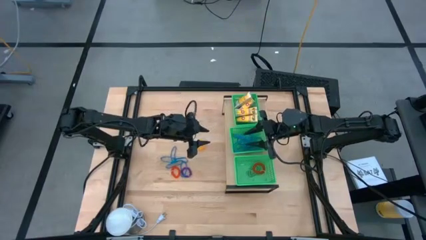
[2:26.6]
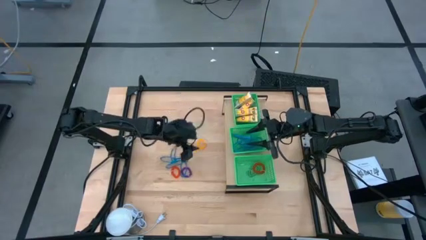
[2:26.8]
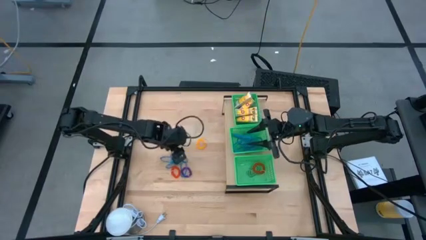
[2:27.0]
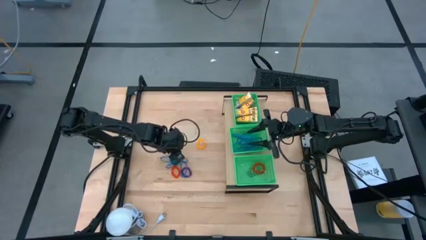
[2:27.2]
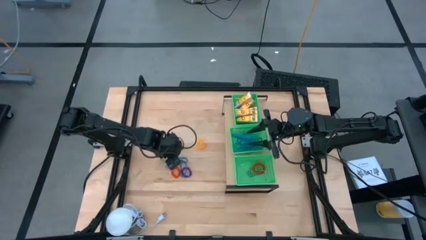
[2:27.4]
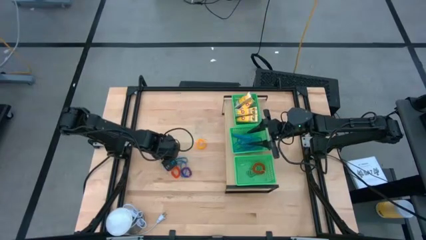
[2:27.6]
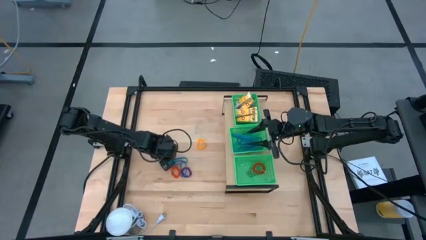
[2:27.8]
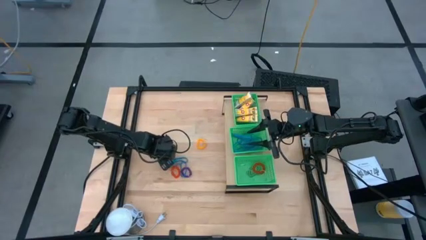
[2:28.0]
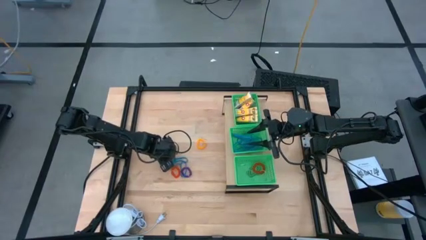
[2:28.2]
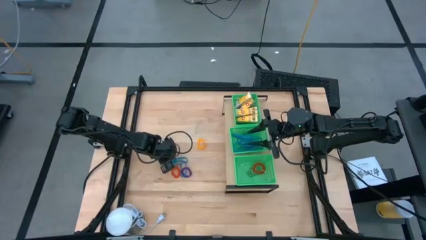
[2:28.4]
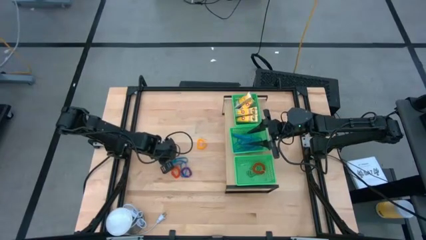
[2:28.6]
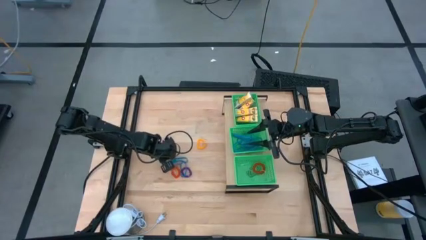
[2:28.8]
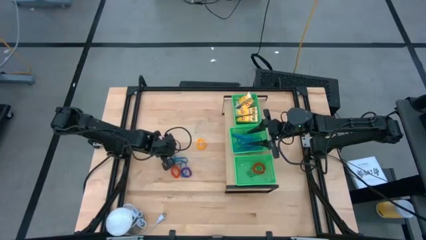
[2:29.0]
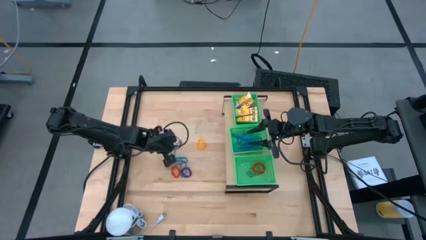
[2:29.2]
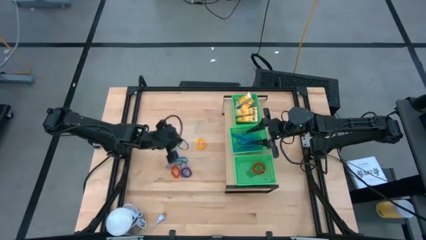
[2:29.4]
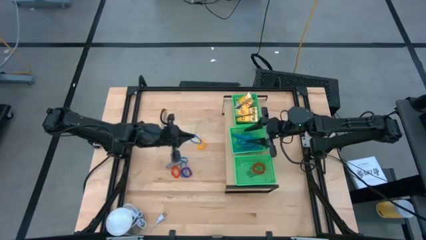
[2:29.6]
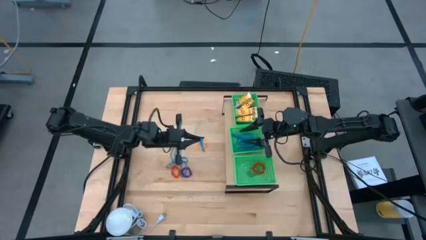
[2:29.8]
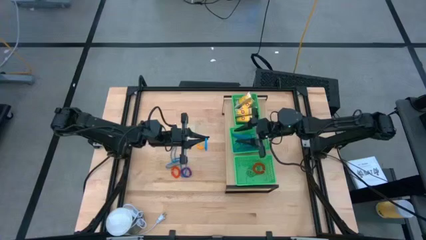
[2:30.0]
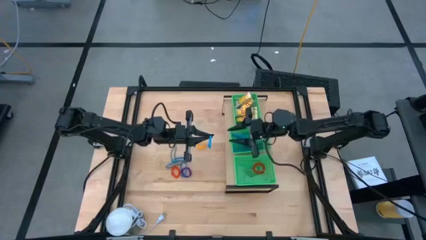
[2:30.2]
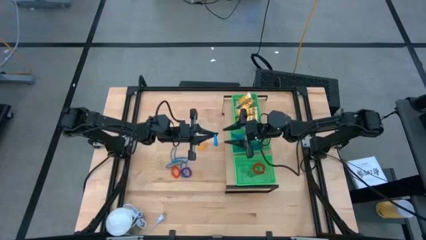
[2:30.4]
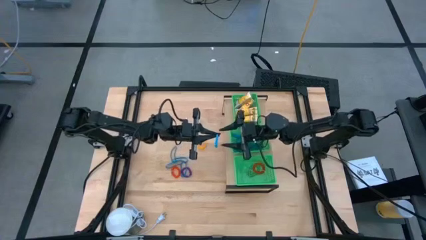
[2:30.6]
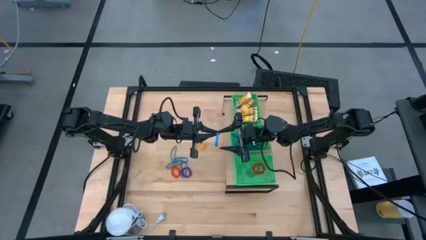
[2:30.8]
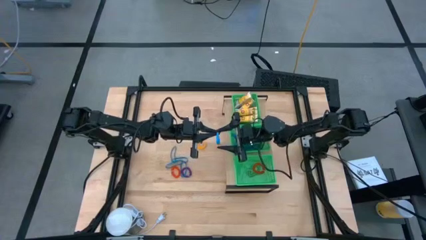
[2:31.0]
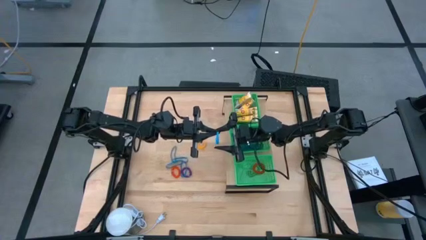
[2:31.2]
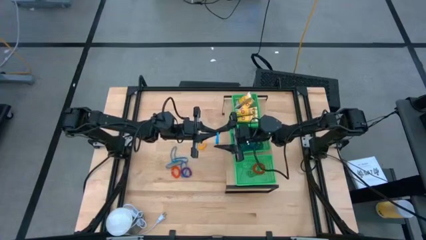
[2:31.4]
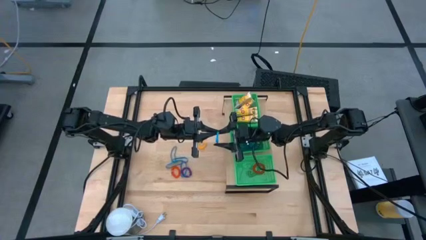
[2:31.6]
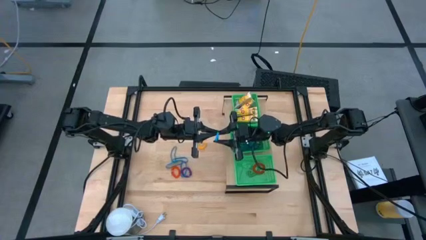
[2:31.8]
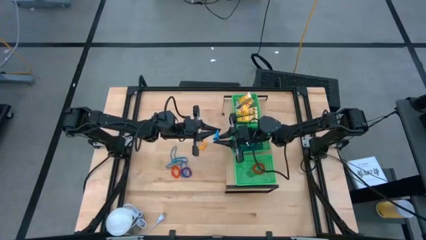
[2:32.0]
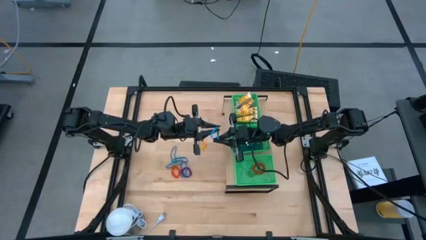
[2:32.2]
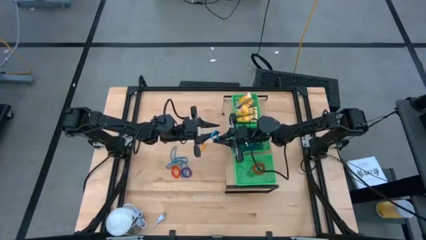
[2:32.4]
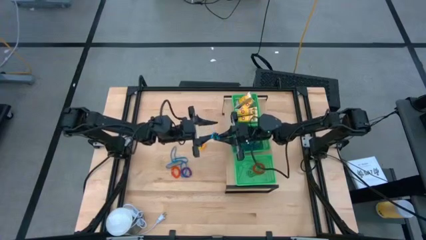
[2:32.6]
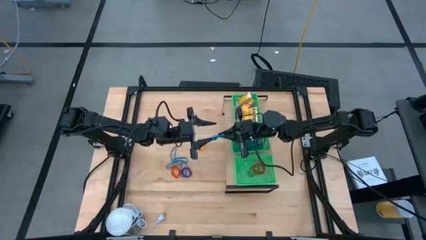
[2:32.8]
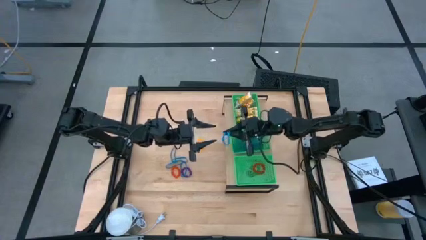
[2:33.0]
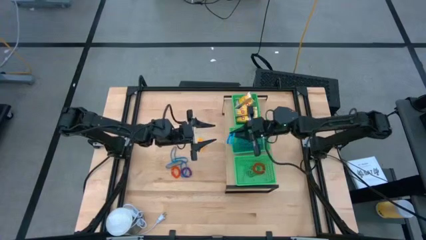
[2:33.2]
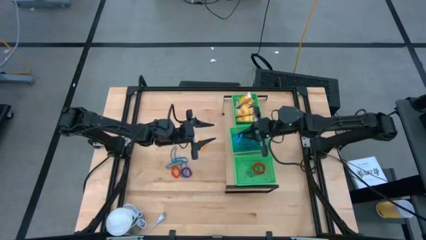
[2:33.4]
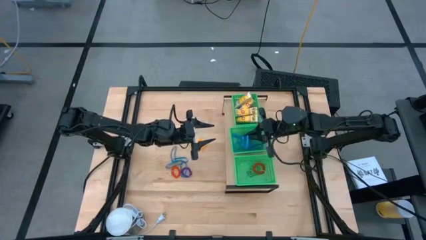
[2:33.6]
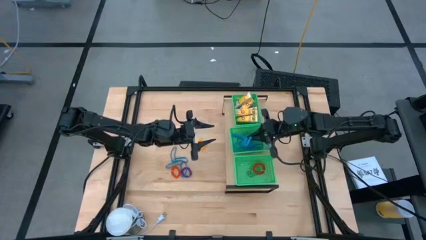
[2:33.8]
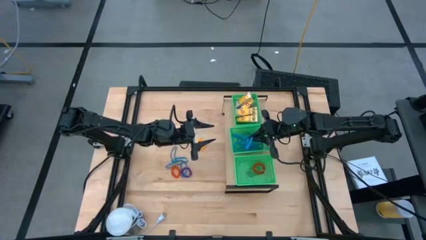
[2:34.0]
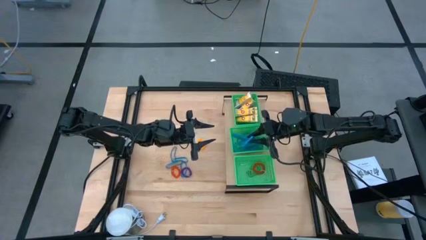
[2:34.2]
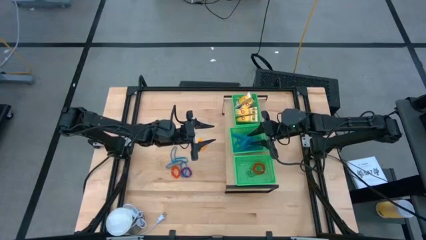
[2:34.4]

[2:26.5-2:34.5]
Task: Pick & Place Office Desk Supplies
Put the blue rubber band into the middle green bin

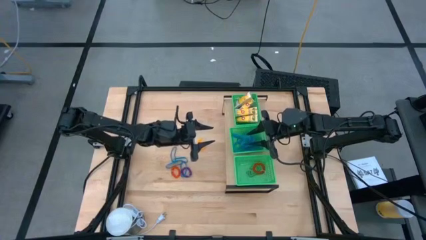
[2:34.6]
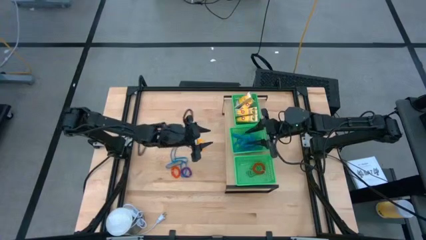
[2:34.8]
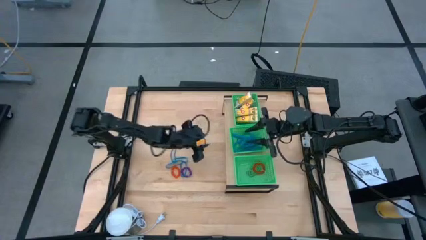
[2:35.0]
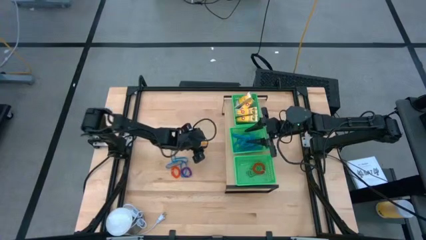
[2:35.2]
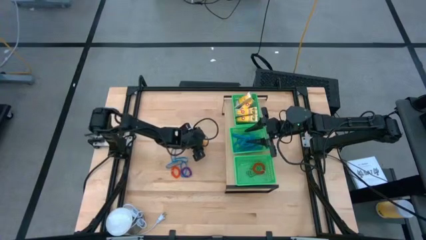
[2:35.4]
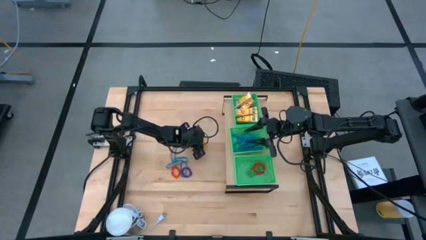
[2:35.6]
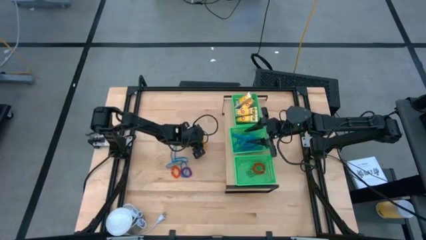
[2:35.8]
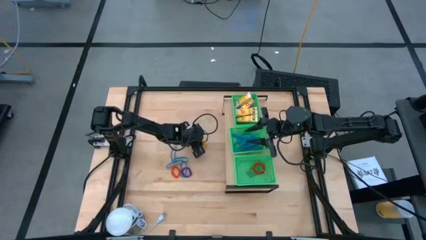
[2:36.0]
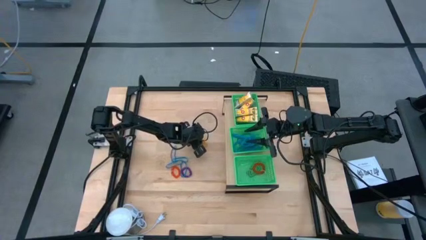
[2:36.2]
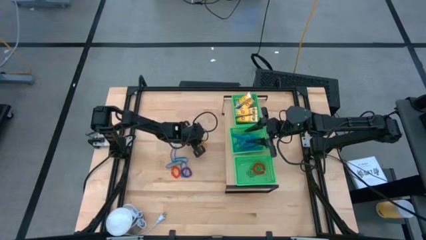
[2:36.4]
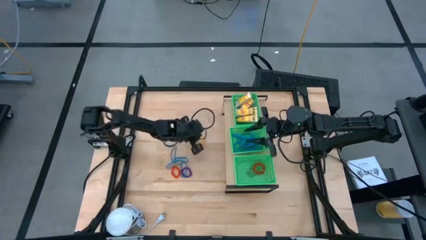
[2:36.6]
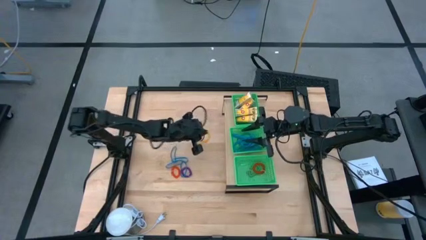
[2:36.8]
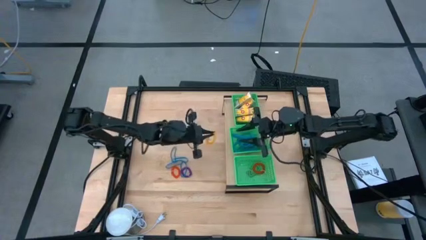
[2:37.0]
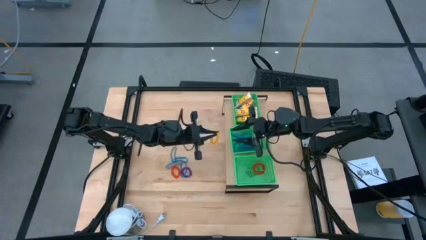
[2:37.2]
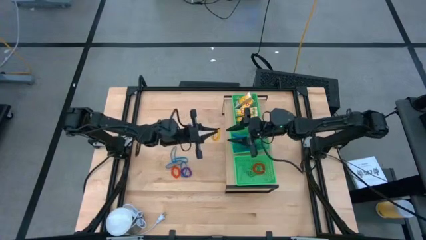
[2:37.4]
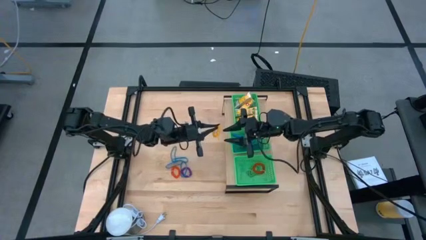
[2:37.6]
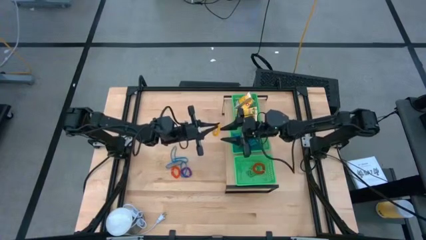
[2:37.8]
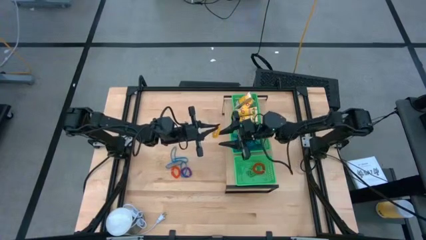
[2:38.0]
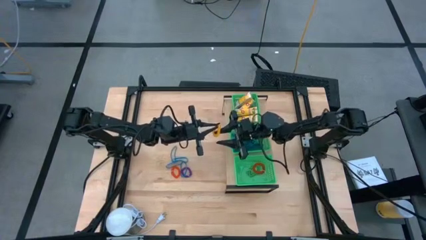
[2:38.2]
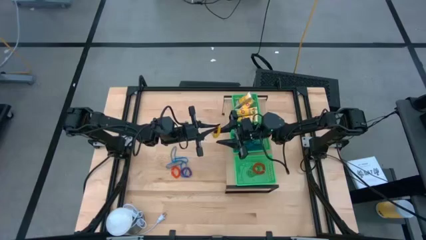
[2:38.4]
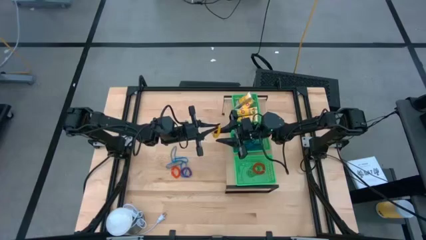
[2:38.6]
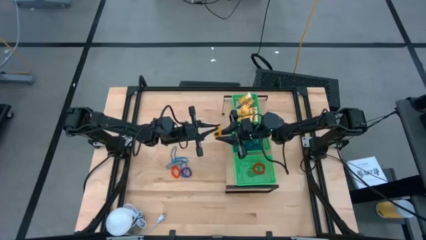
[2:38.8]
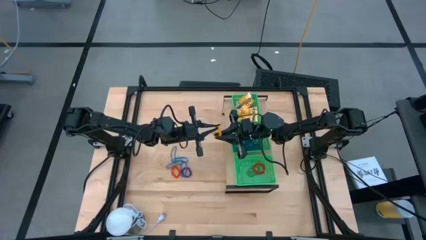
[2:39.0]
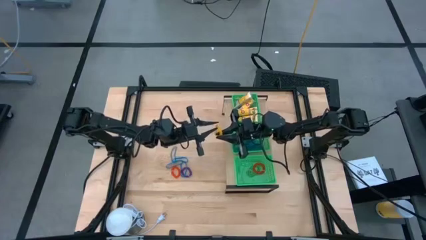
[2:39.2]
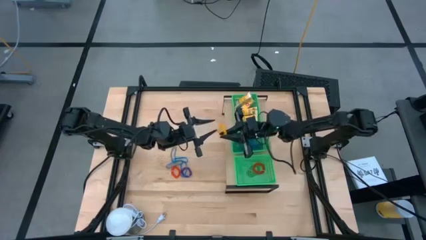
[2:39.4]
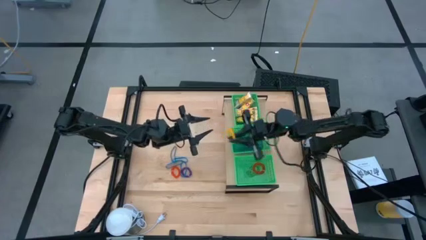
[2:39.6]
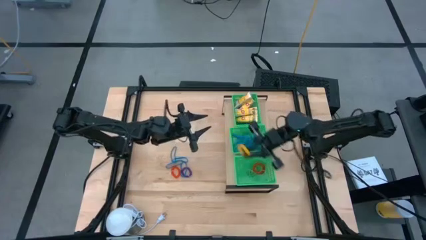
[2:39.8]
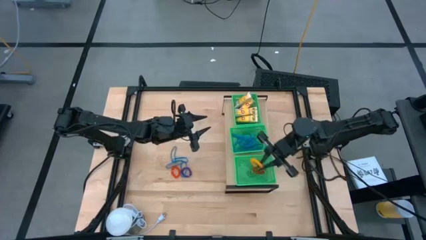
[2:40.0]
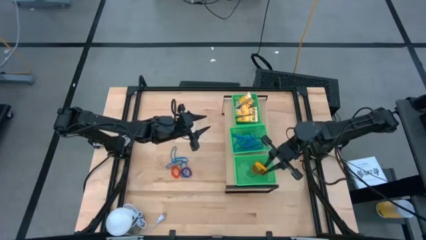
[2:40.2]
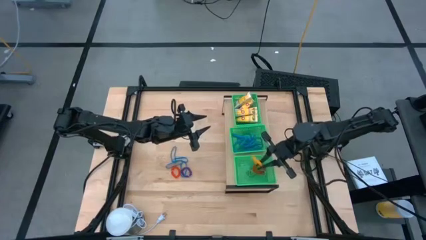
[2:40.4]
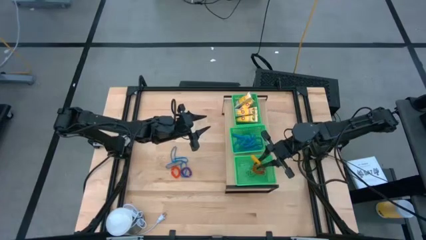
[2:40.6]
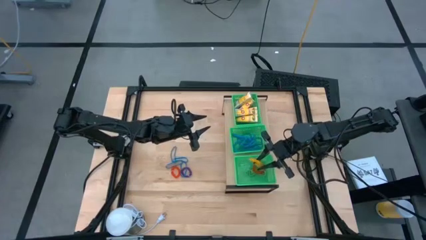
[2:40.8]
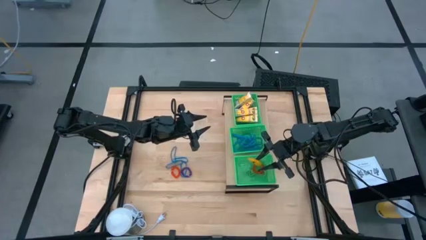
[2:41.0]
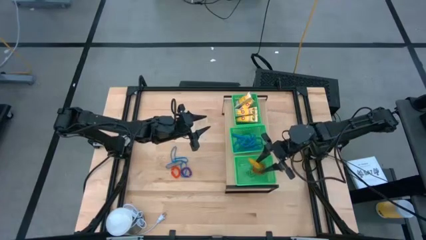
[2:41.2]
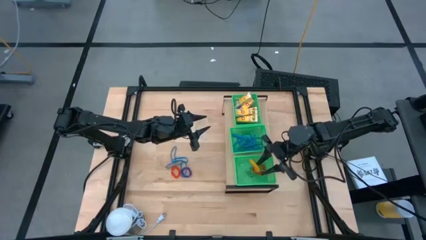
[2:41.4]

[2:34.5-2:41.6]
Put the yellow spring keychain into the bottom green bin

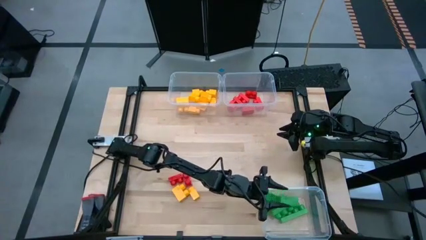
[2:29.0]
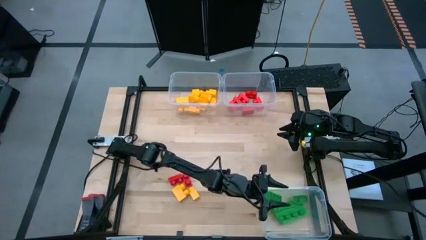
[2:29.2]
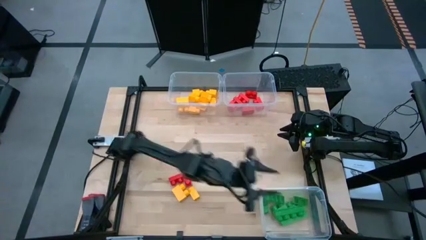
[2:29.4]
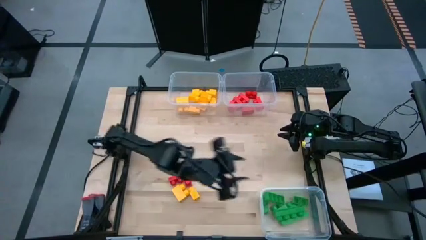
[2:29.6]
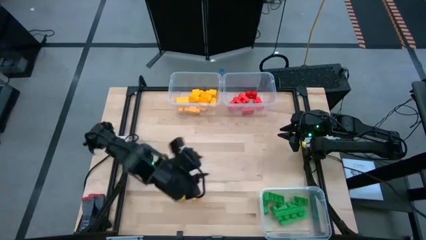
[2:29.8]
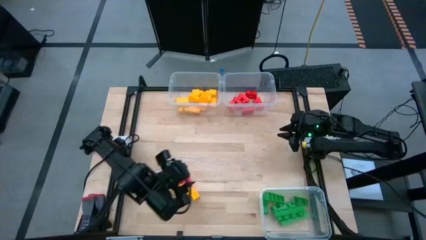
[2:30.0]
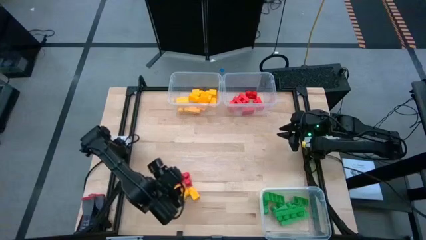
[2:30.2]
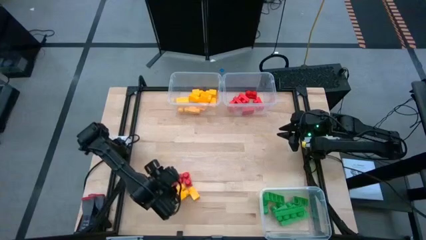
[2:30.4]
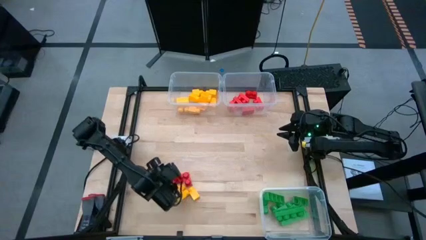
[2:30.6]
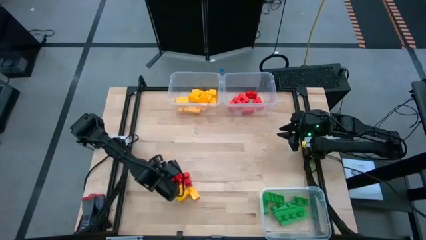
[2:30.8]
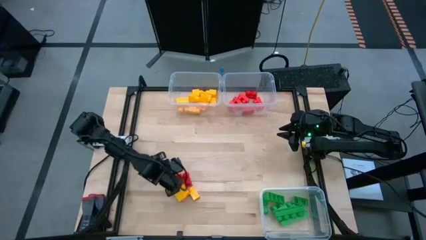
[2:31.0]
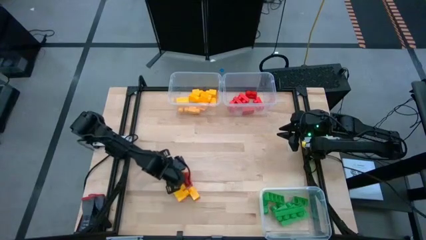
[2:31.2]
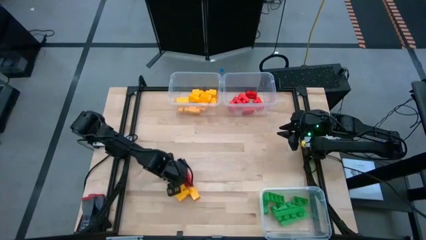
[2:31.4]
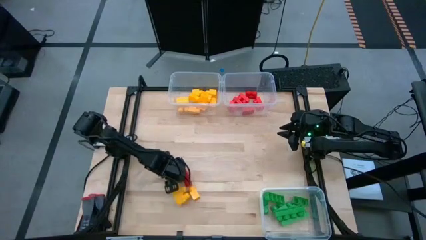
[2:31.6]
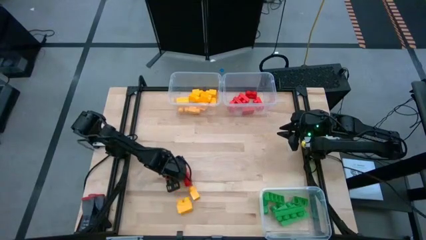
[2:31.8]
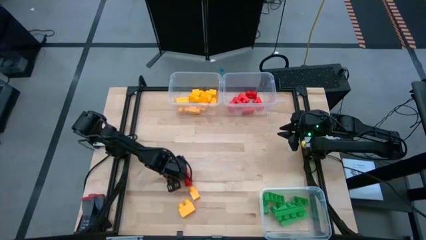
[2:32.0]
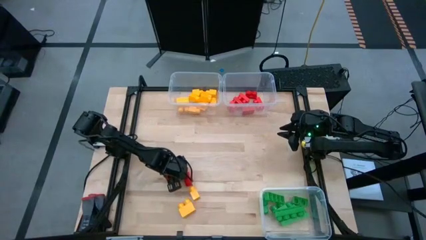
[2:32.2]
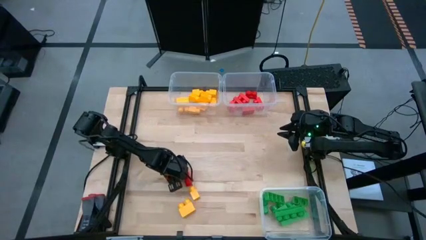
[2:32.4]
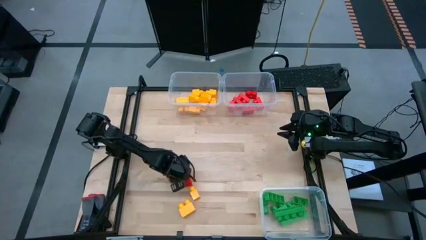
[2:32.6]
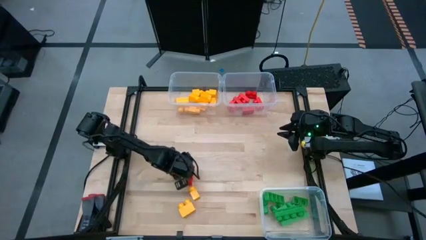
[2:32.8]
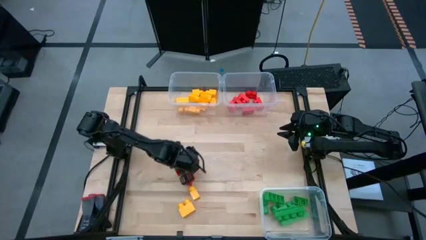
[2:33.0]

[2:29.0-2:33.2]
Task: Sort blocks
Put the red game piece into the top right transparent bin
